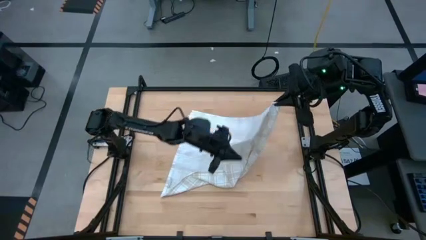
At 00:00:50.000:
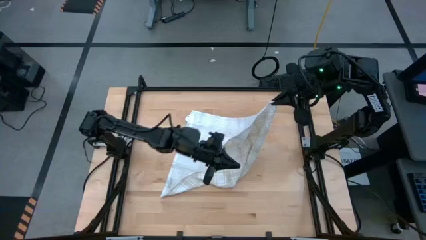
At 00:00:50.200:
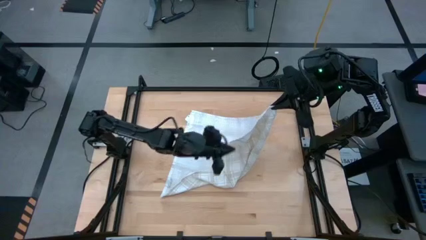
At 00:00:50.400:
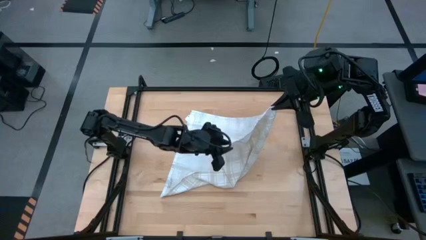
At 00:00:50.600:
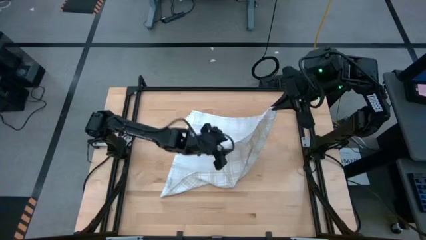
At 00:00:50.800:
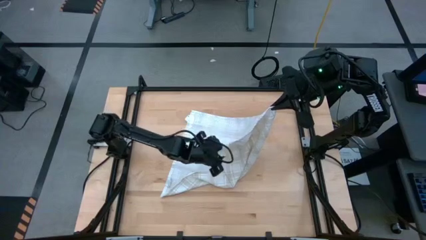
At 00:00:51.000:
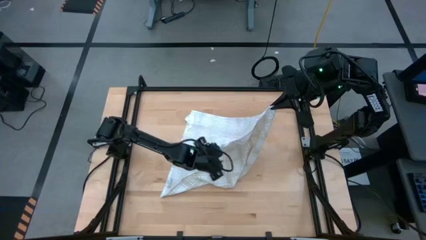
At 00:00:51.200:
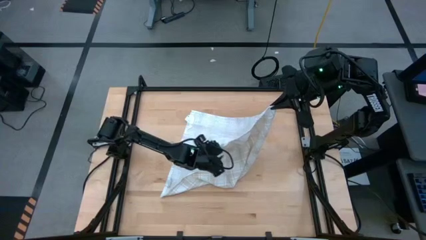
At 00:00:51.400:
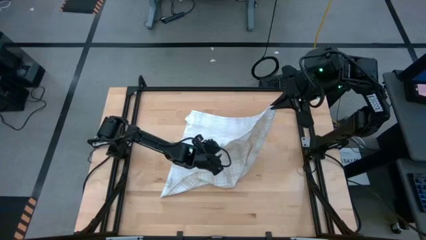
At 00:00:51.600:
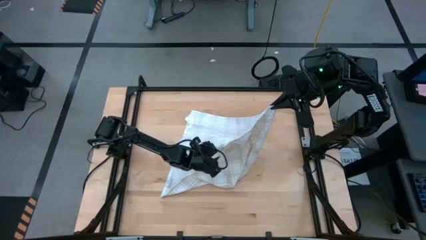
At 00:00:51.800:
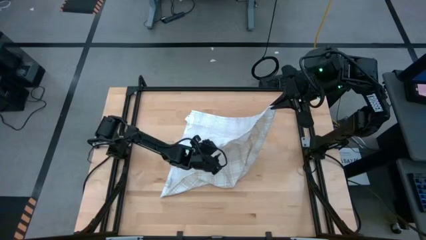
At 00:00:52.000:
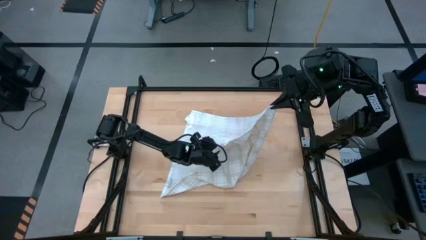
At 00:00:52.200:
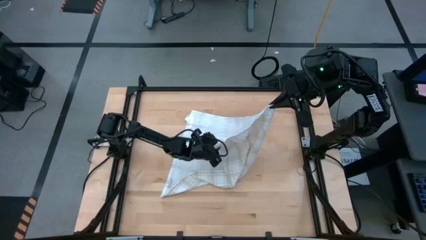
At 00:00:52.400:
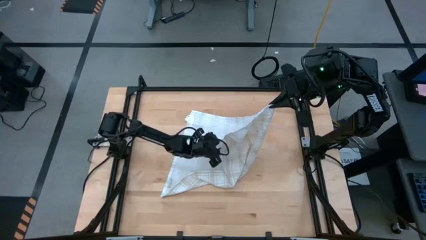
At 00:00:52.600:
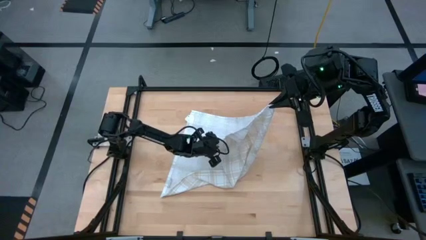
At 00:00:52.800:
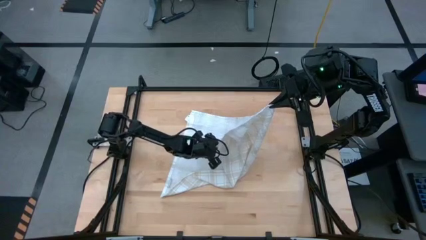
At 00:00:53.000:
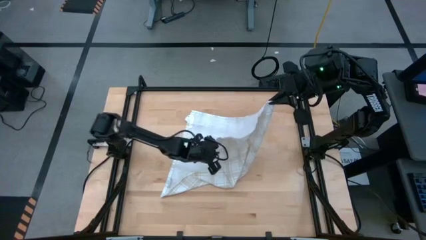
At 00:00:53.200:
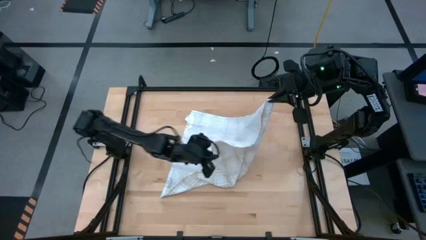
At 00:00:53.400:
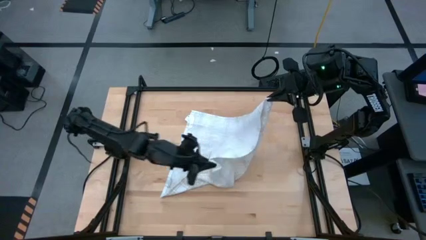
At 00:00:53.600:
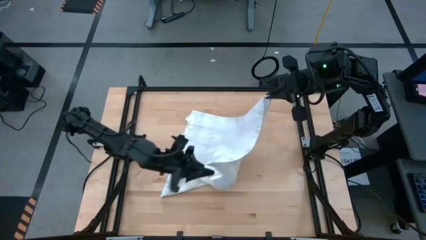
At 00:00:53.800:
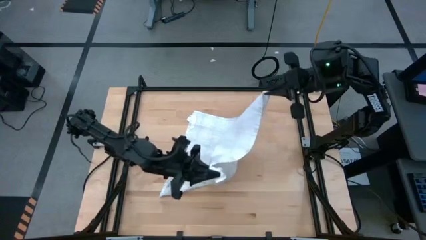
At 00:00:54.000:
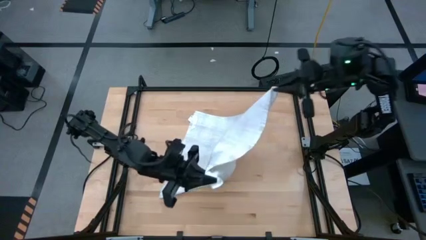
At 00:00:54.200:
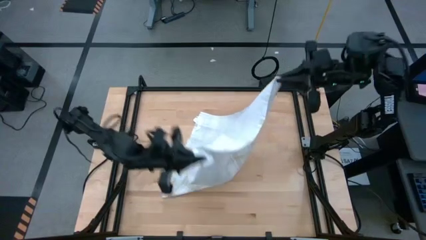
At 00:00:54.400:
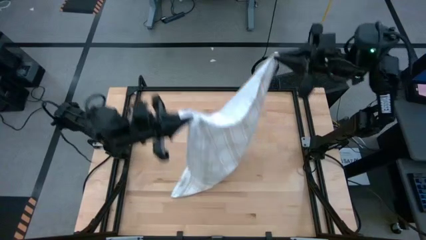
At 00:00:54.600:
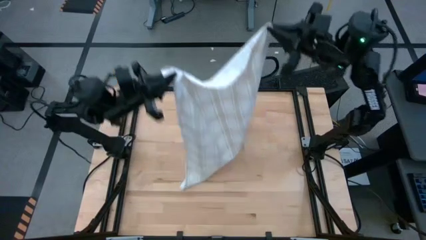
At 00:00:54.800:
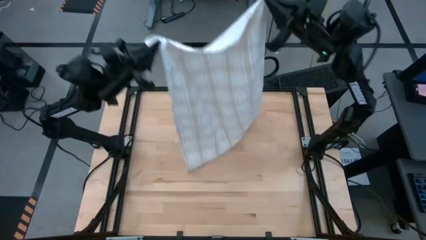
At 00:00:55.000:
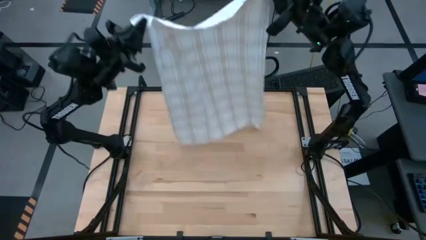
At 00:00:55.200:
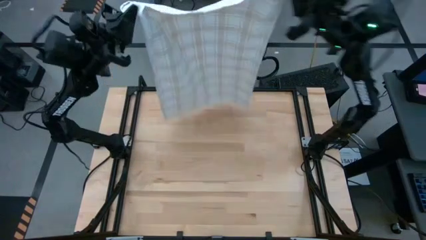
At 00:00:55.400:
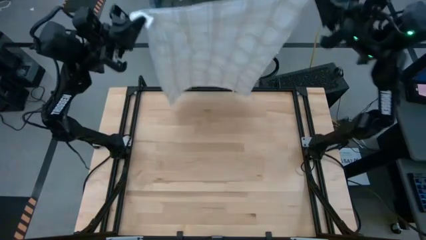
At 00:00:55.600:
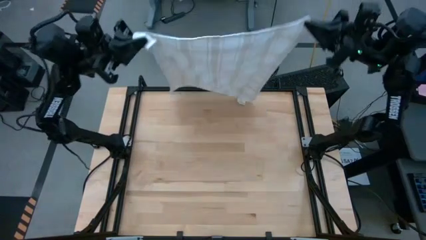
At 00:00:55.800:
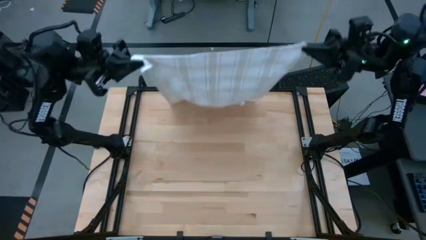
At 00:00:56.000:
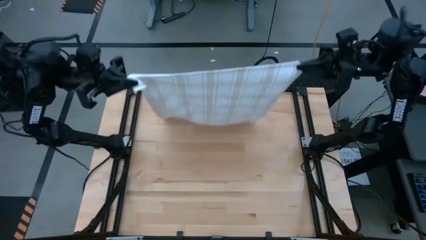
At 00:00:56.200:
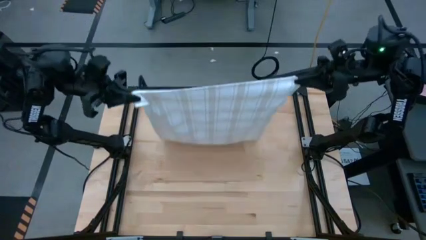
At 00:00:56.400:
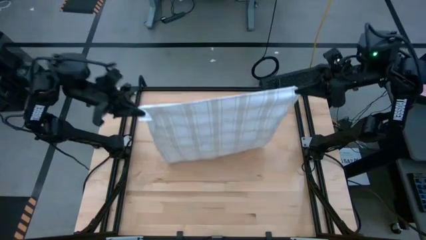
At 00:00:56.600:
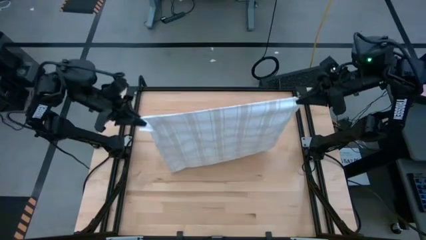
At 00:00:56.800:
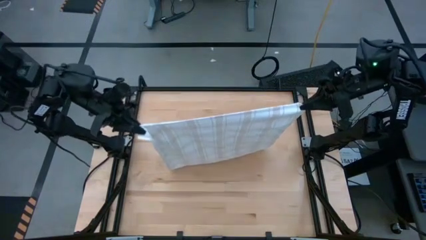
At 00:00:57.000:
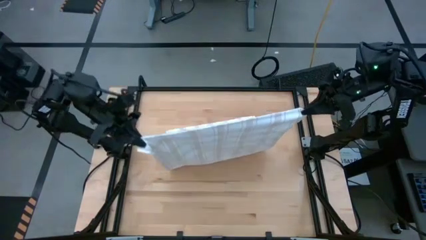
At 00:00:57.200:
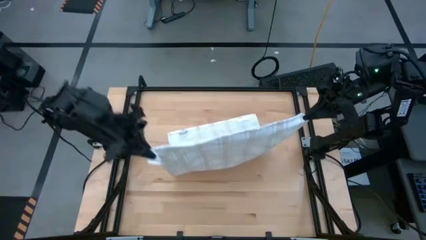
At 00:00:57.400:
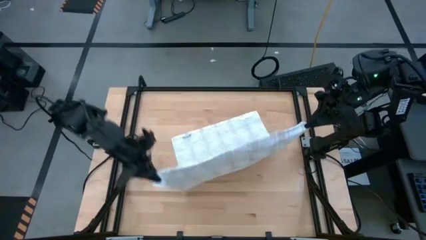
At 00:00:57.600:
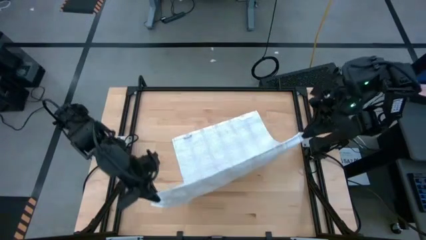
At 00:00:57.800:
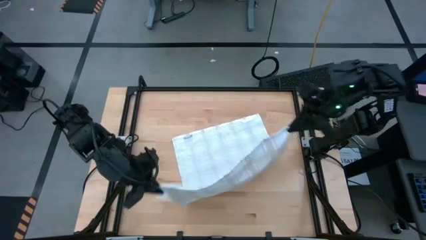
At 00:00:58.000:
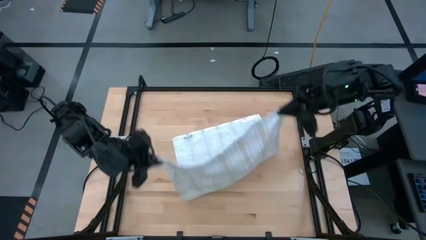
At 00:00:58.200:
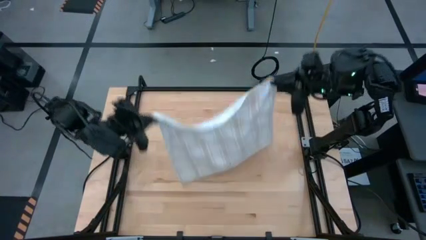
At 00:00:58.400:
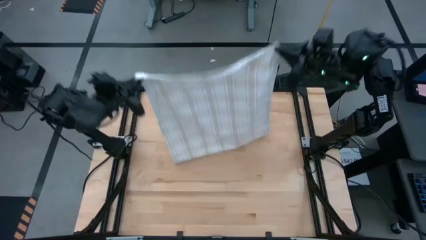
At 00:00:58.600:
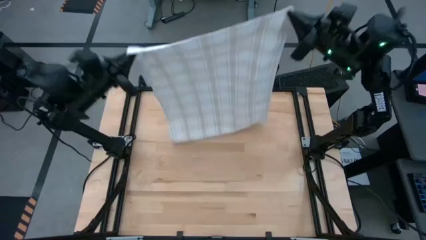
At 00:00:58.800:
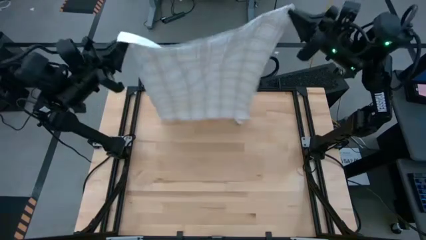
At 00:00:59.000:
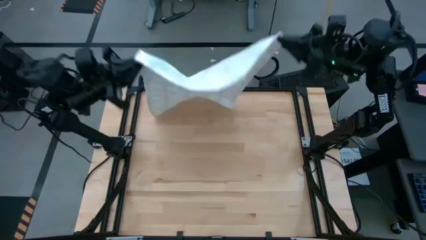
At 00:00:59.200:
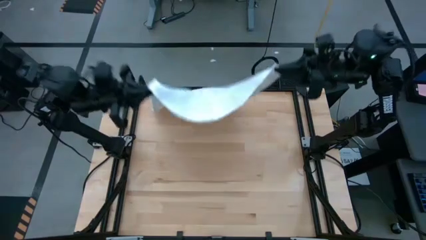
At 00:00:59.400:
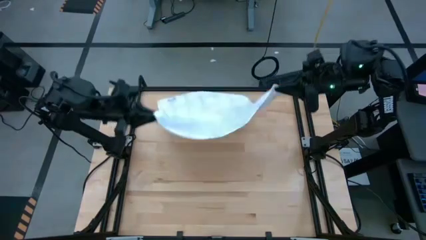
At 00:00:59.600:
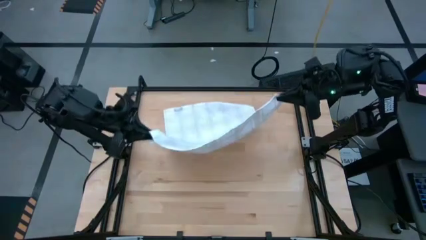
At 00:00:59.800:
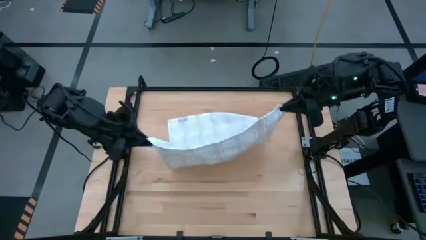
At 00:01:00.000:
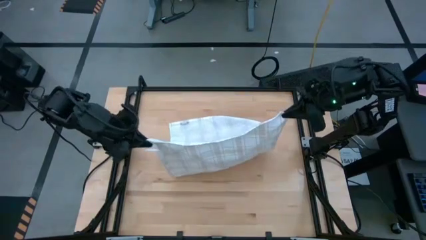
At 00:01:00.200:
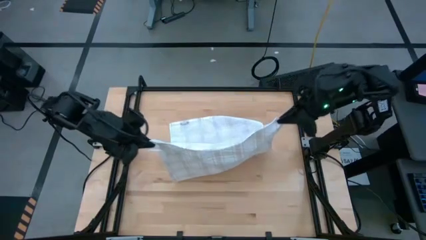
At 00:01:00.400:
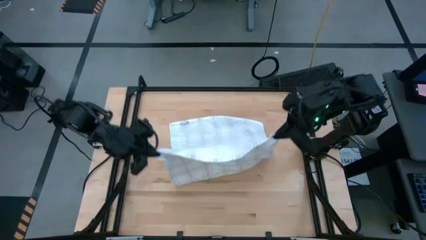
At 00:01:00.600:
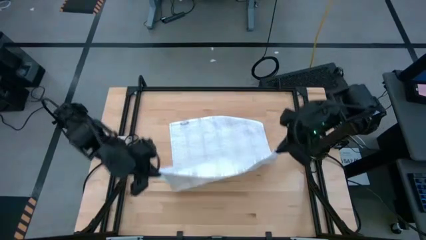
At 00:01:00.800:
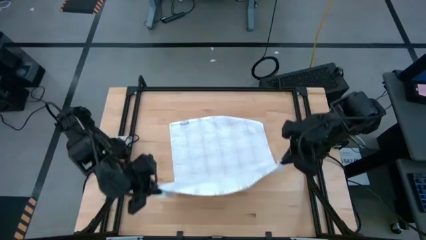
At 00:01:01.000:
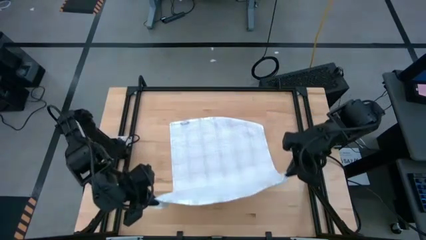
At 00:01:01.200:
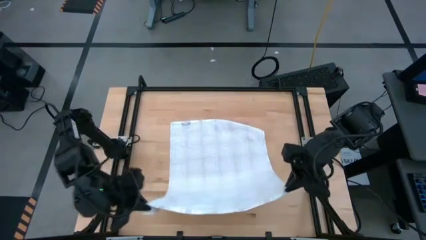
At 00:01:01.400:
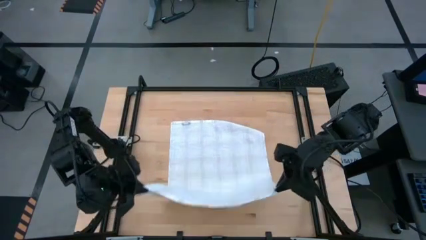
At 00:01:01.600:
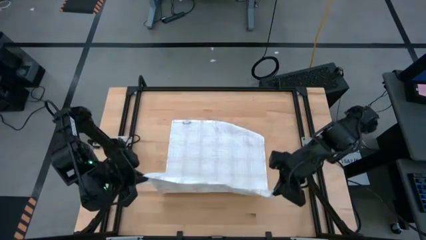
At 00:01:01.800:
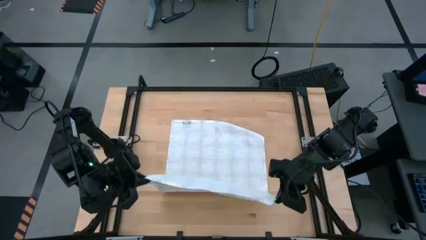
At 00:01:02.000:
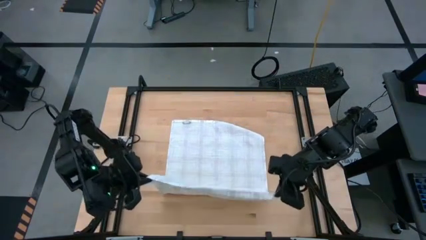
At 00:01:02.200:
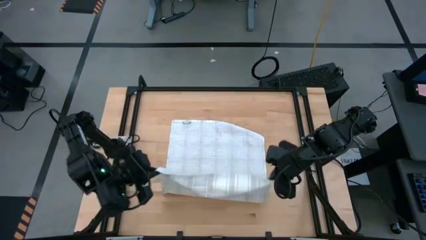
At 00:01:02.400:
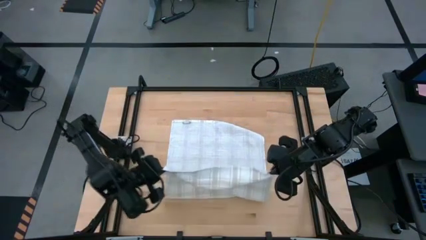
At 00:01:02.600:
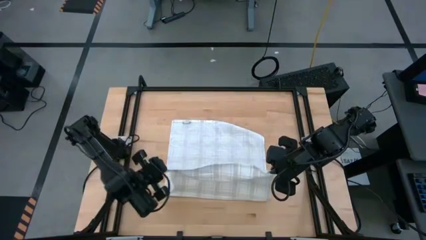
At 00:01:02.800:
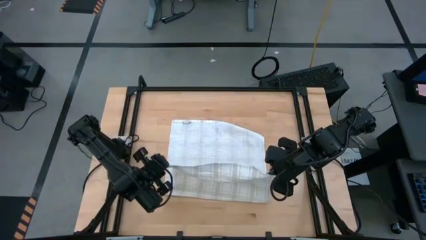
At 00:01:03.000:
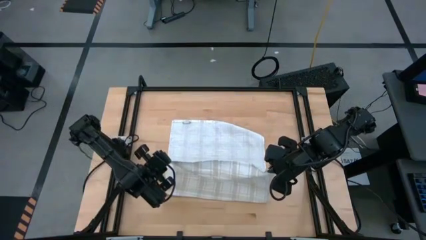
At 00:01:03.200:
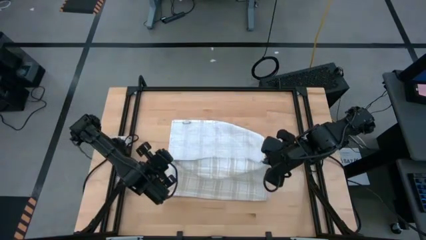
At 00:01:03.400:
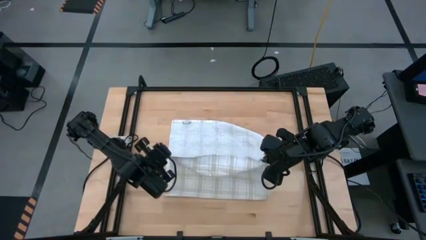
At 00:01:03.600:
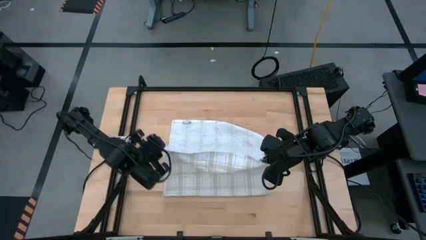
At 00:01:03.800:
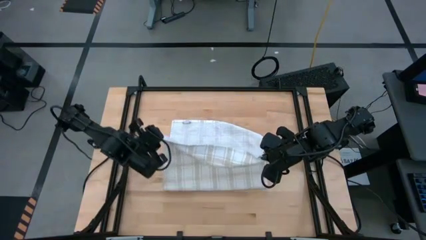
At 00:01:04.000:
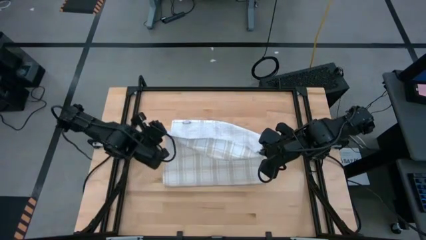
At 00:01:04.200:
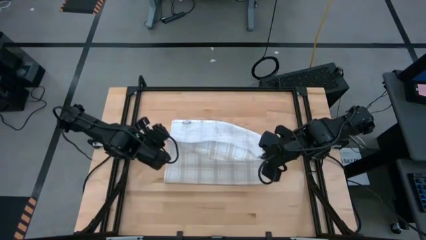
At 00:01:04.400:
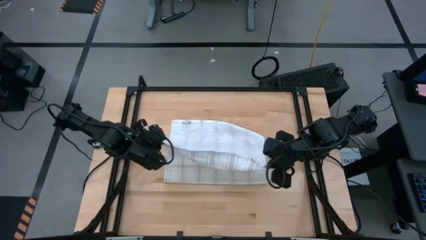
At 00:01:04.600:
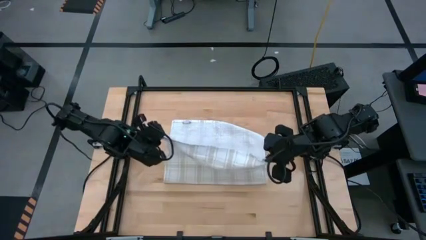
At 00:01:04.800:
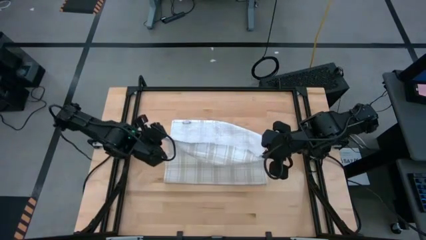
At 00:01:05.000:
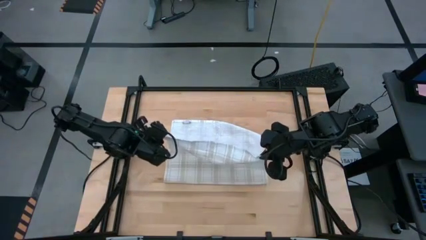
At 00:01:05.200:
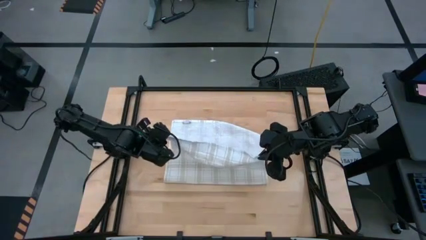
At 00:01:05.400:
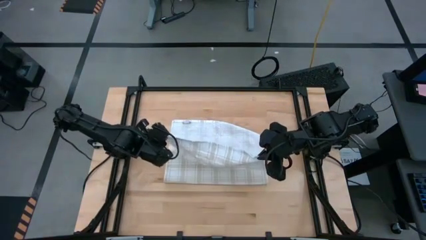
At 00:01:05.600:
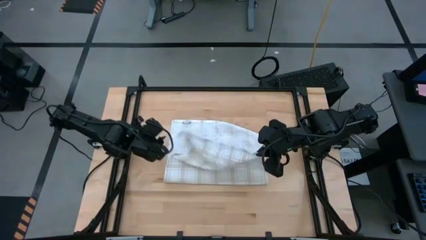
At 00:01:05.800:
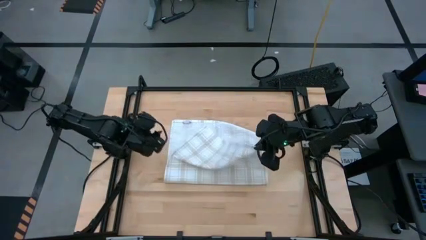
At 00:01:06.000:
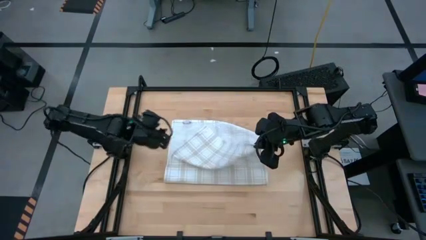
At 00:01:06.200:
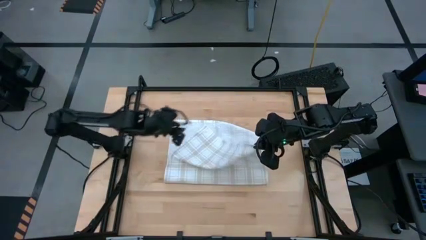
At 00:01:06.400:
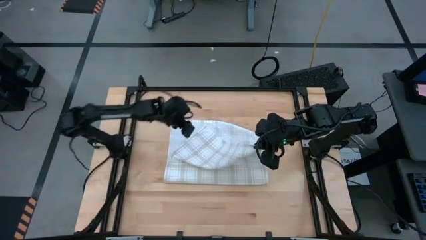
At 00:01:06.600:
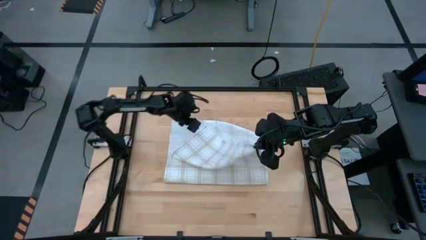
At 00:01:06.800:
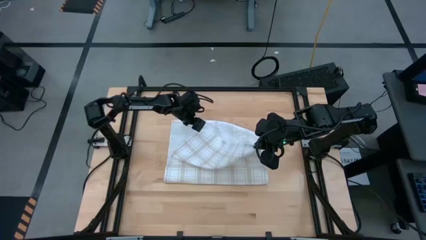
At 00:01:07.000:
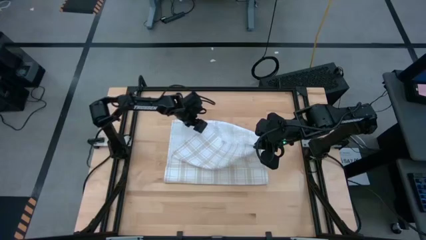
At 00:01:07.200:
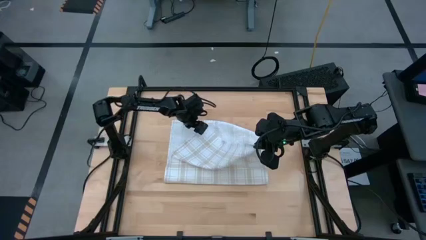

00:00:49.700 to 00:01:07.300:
Task: Roll towel
Roll the towel
